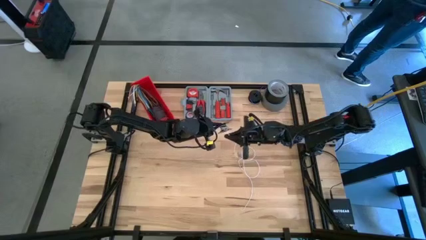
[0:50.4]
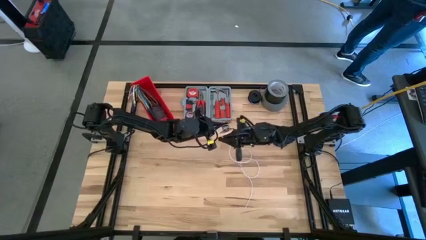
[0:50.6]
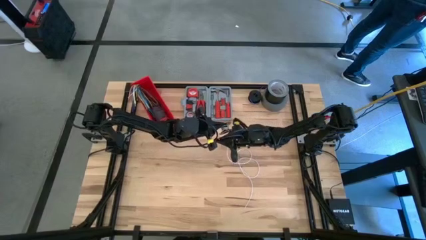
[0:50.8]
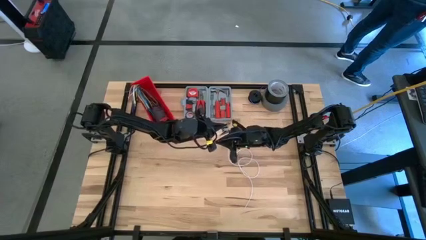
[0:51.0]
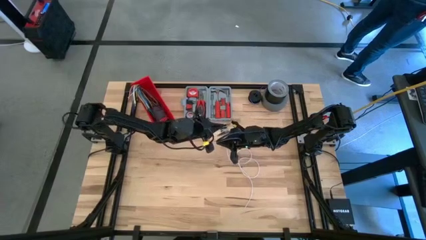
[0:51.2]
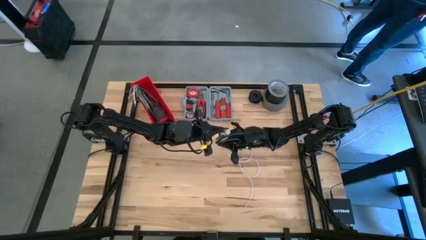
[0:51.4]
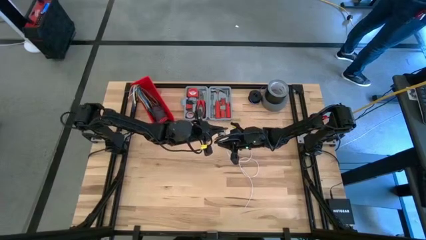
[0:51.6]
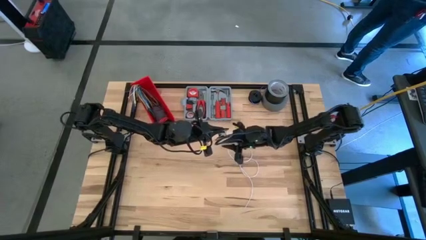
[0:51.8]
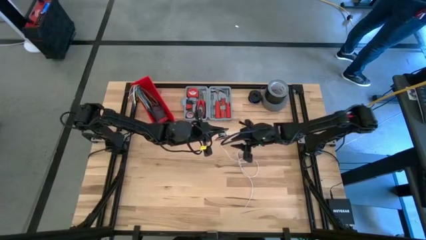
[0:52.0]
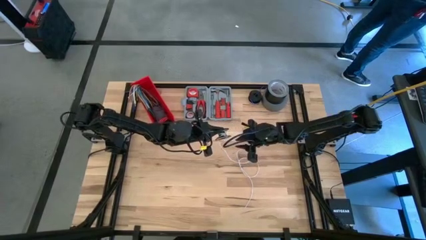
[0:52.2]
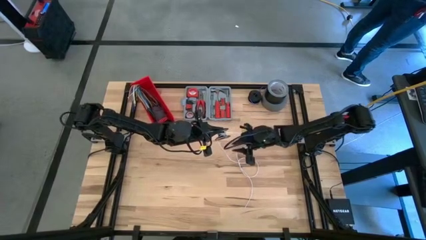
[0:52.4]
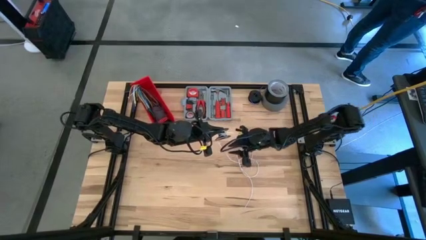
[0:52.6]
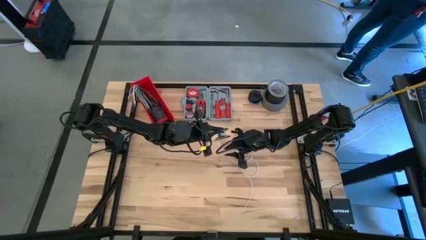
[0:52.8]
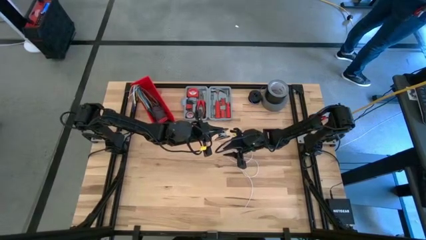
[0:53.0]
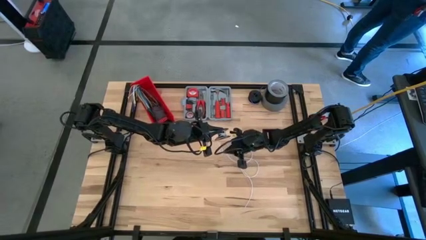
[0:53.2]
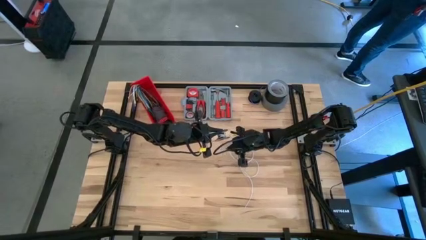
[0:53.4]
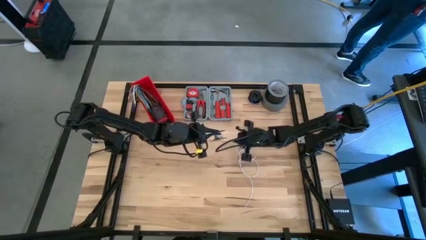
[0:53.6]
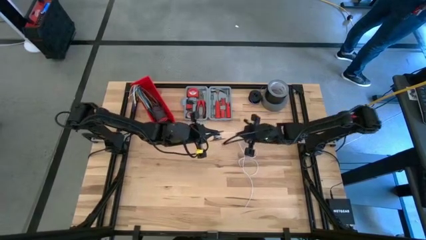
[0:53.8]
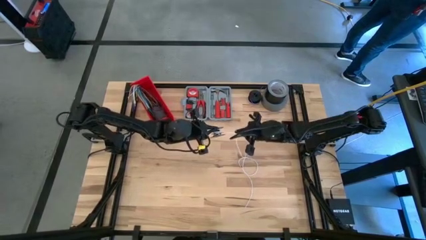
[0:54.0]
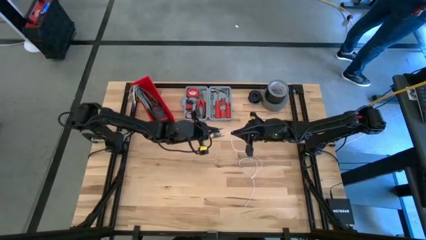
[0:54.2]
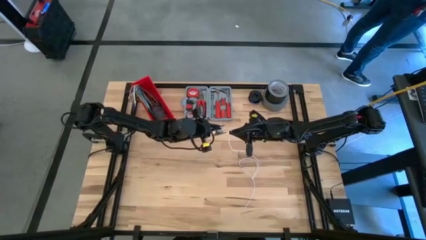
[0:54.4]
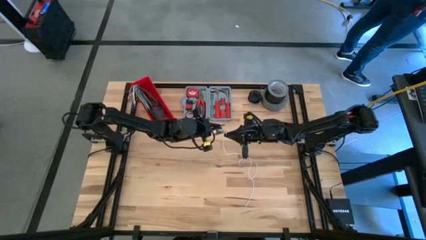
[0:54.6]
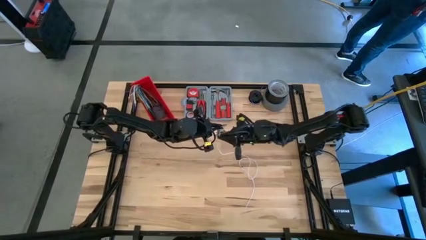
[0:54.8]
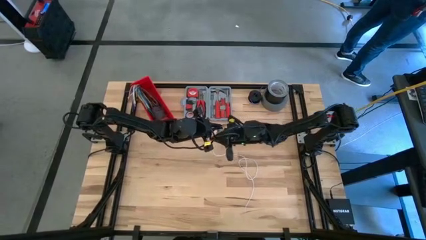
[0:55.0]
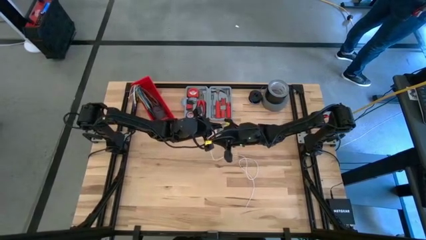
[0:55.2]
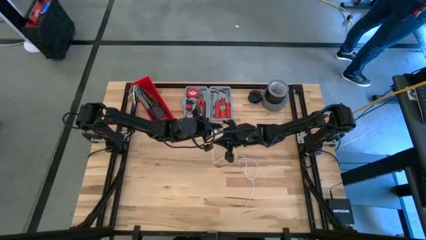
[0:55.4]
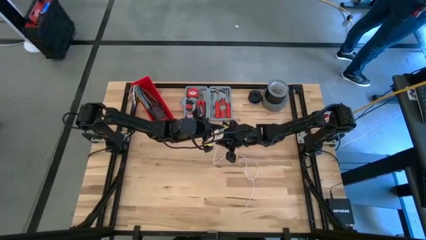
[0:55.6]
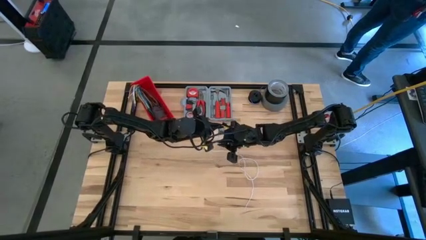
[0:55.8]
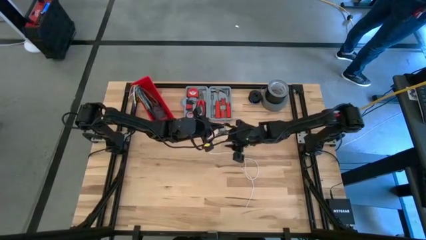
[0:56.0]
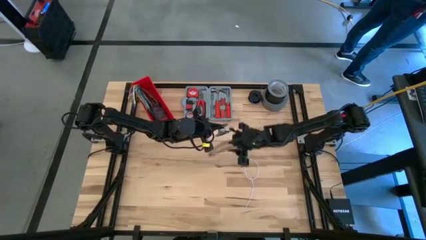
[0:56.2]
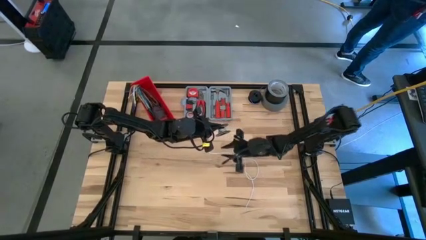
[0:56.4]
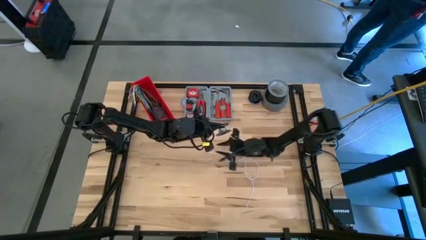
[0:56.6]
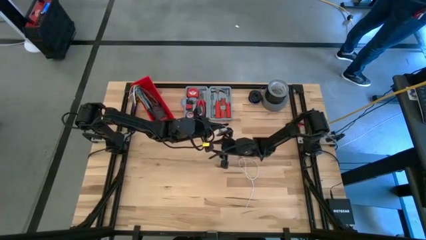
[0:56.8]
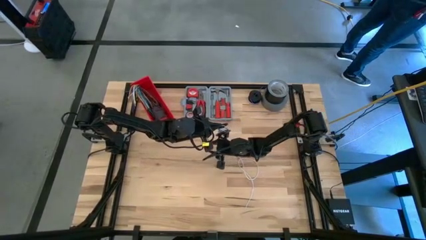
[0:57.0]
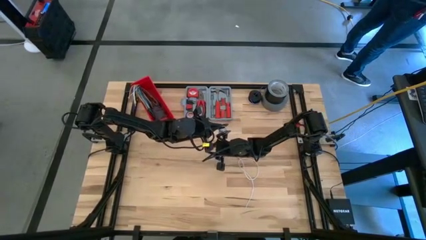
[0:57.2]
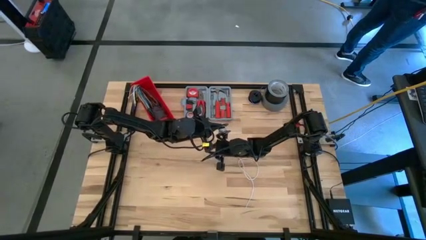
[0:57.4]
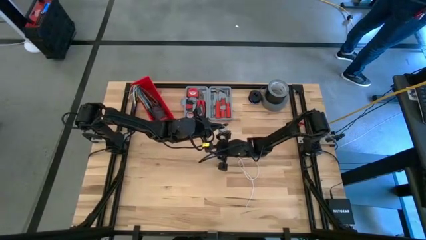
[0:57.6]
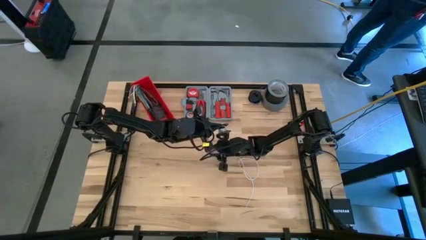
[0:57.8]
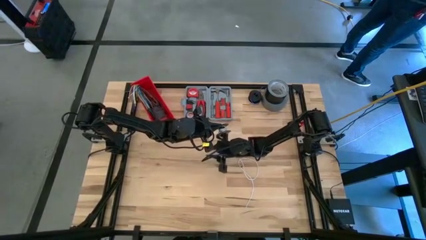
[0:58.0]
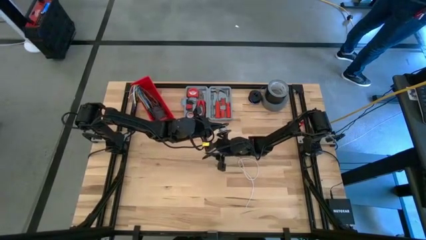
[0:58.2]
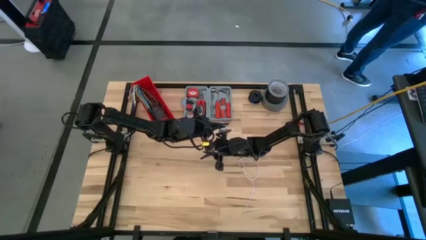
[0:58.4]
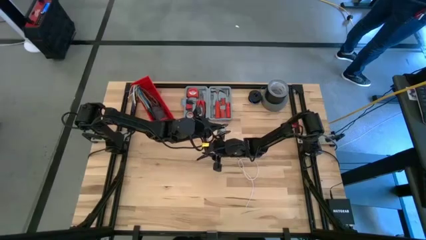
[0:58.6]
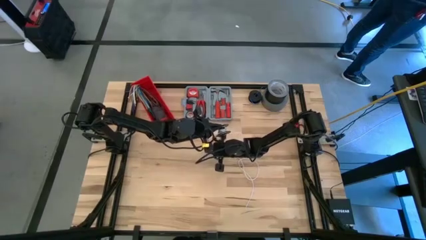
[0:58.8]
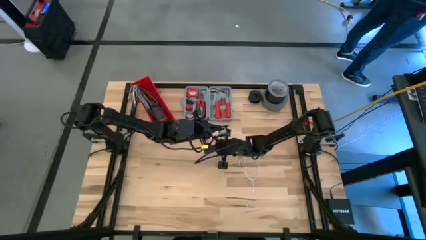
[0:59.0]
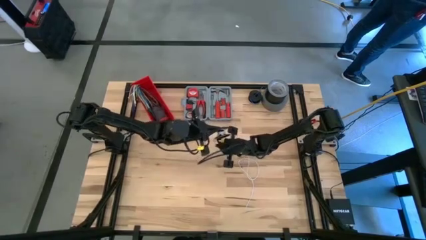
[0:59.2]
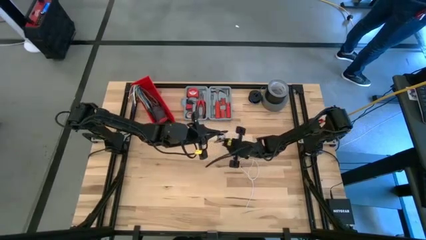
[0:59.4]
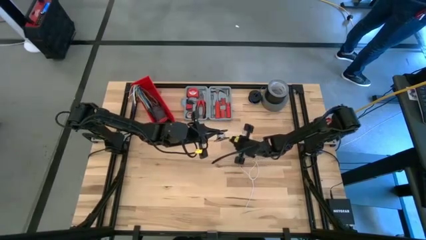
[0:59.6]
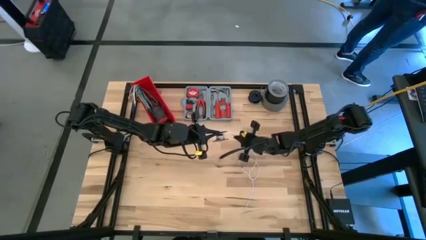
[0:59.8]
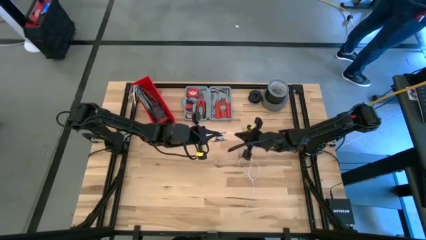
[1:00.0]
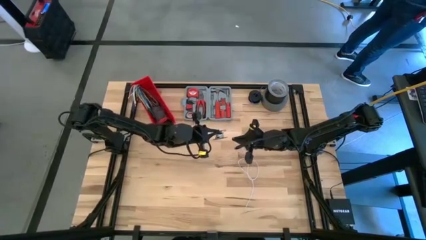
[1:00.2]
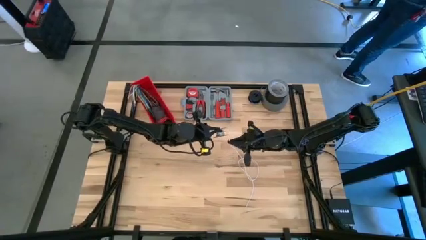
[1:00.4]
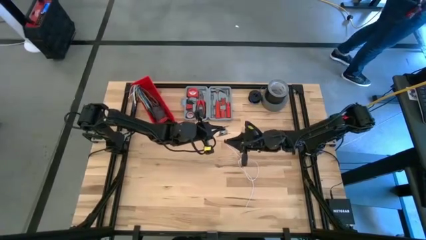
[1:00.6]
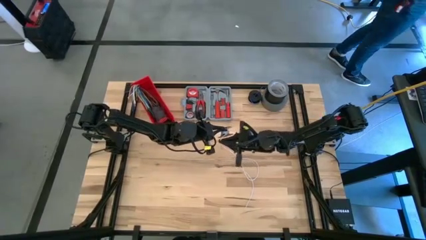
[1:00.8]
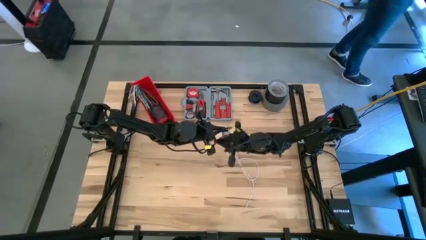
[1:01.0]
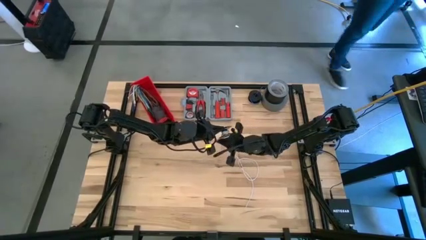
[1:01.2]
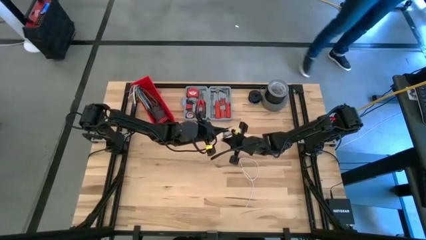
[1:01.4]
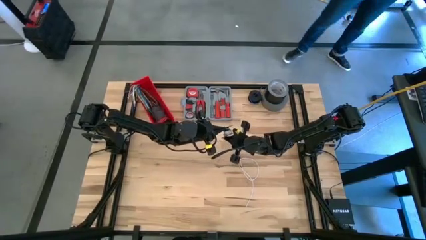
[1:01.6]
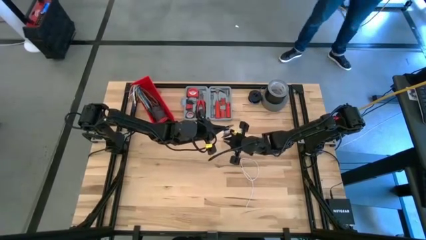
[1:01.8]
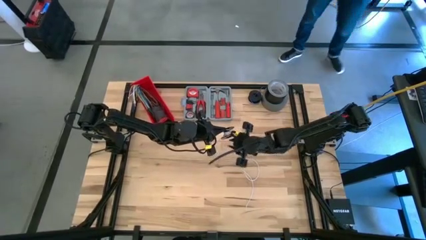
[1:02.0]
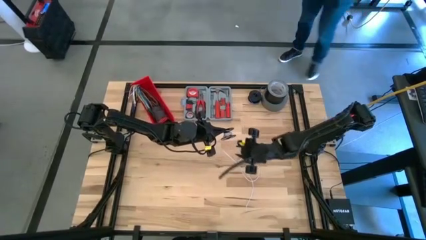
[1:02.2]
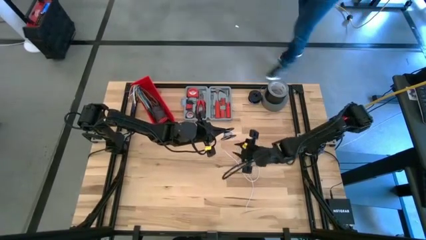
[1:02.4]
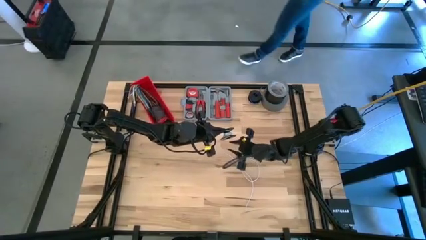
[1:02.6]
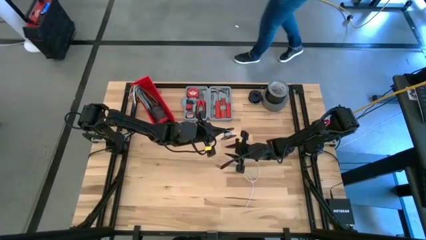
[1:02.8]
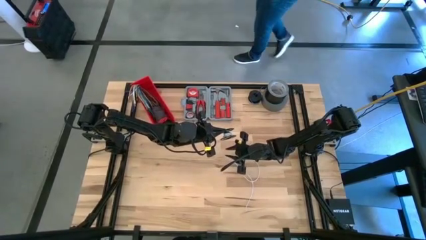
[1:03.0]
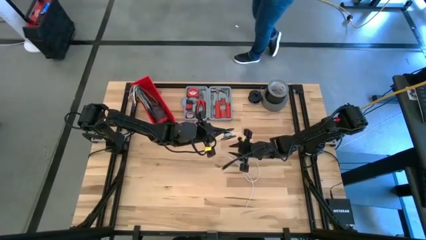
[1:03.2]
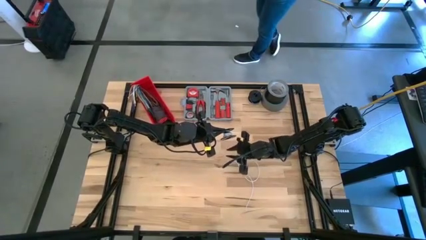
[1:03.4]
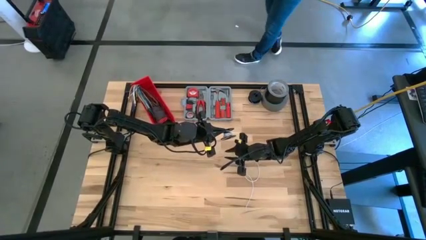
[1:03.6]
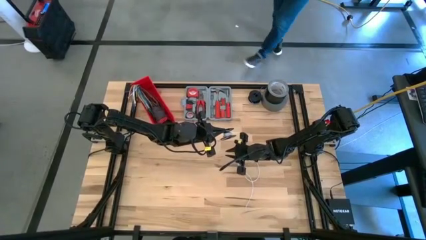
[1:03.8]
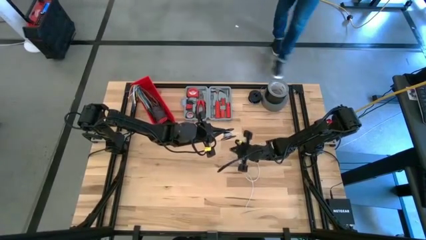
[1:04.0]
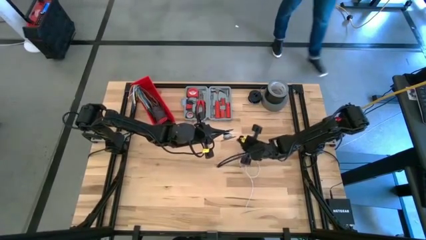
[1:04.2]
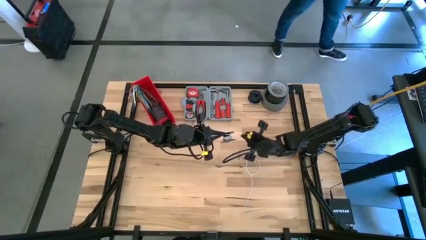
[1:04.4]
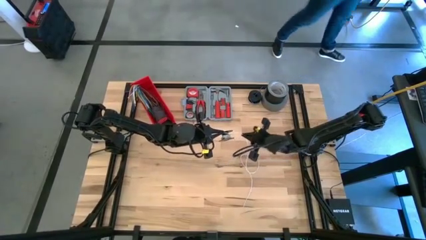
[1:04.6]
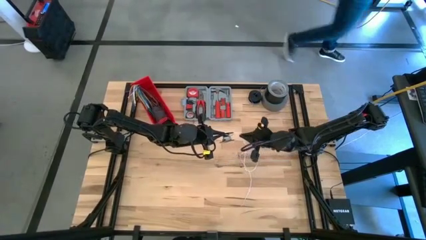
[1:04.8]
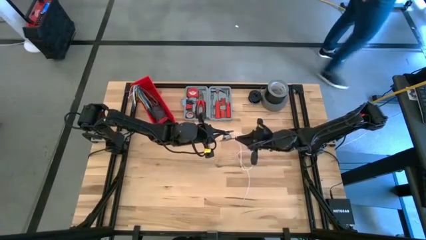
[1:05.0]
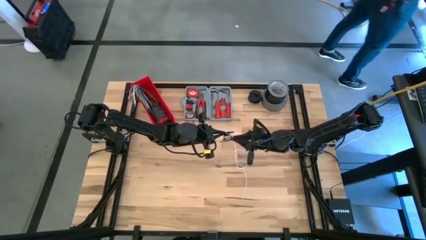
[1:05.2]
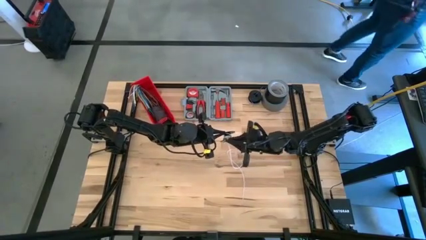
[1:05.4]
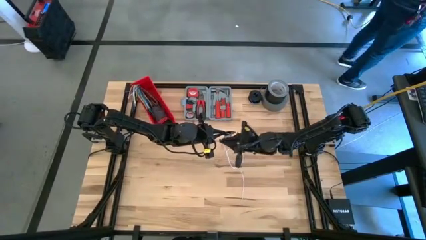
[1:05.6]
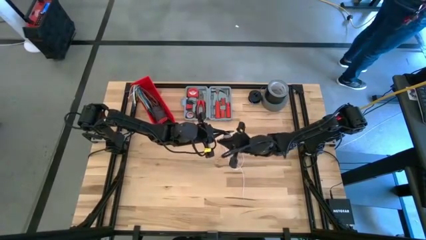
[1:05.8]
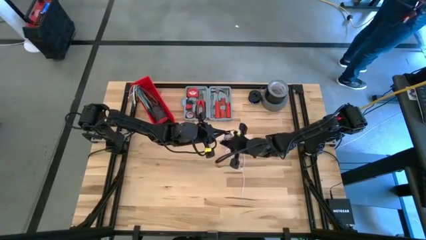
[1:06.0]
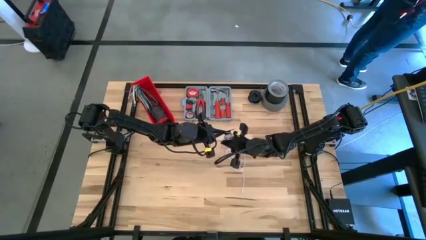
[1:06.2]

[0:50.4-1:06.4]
Task: Coil cords
Coil the white wire into the spool
